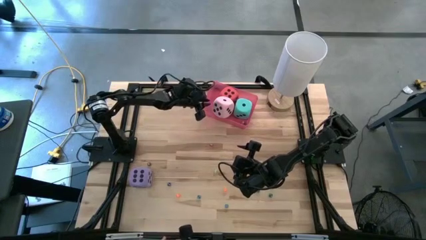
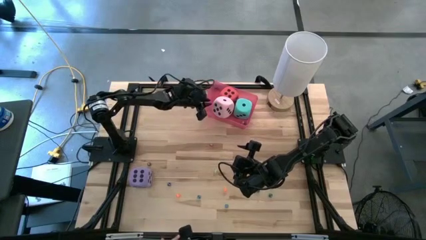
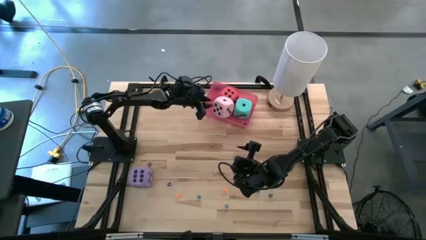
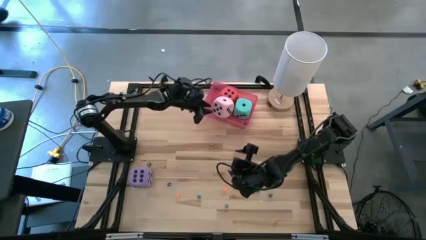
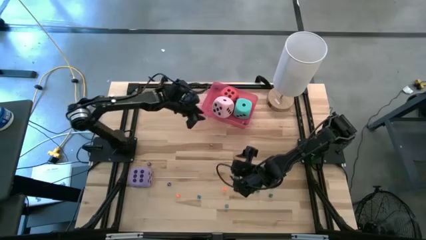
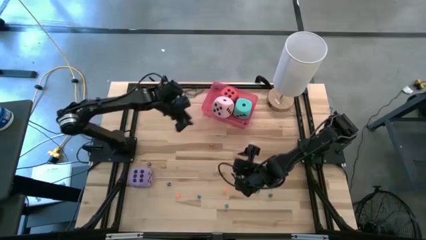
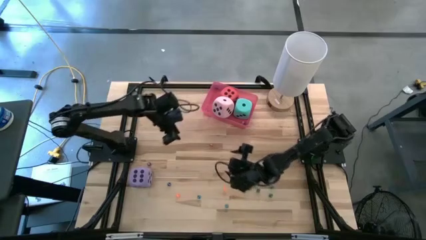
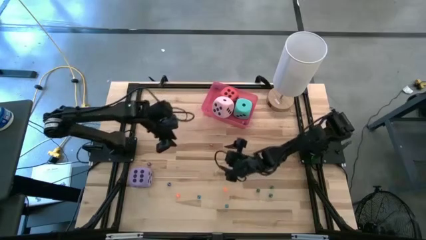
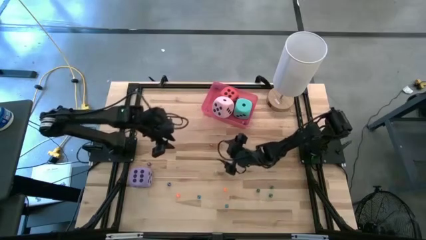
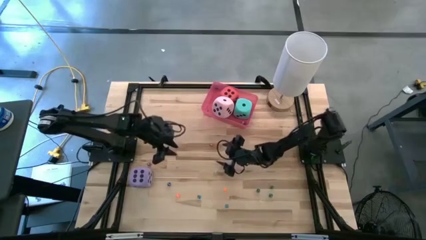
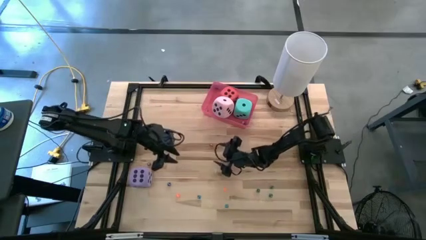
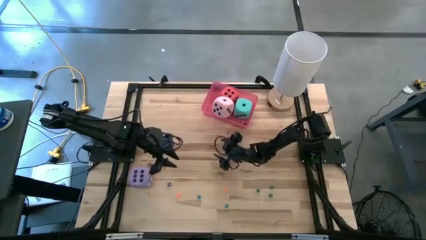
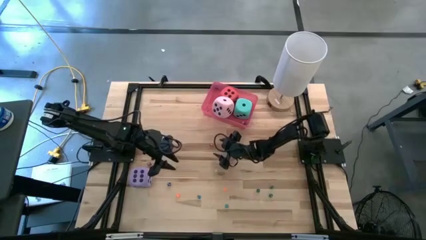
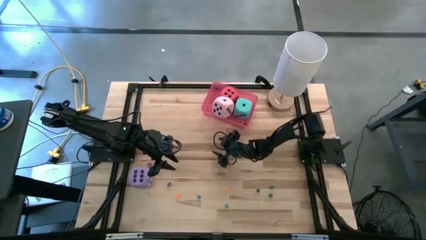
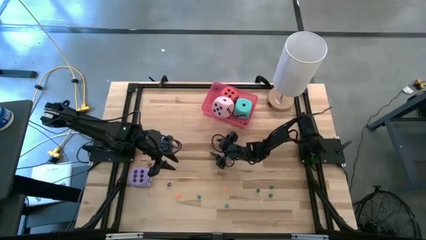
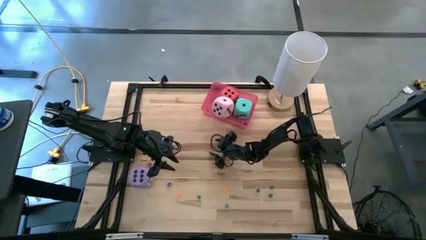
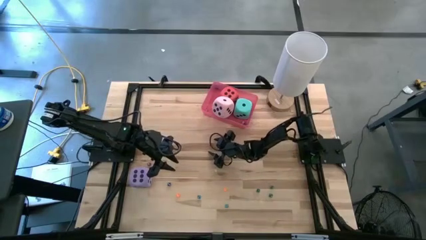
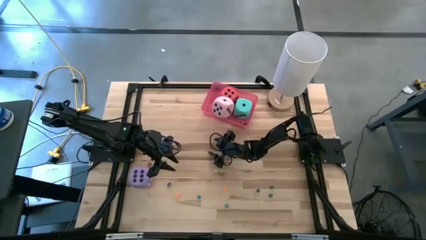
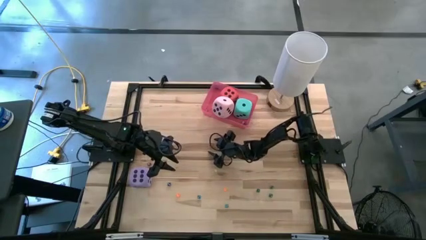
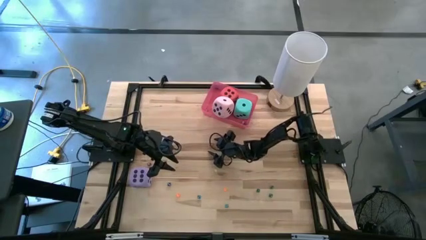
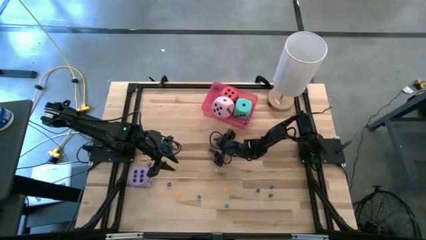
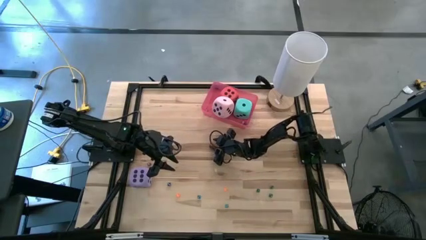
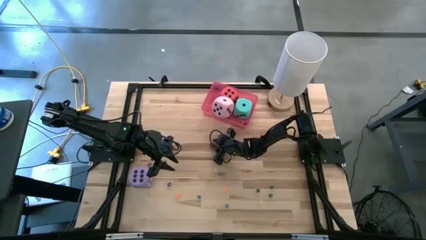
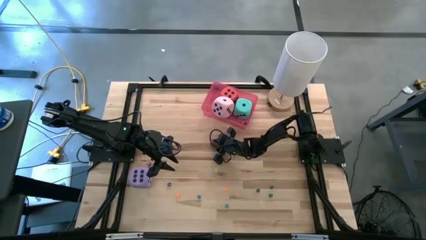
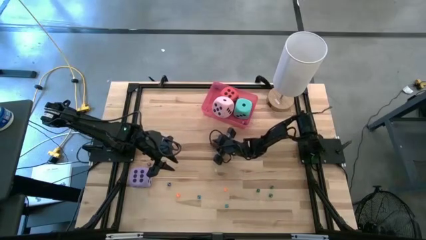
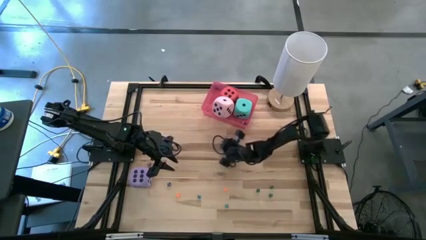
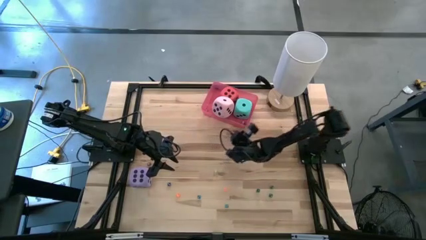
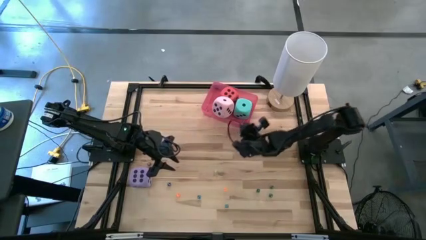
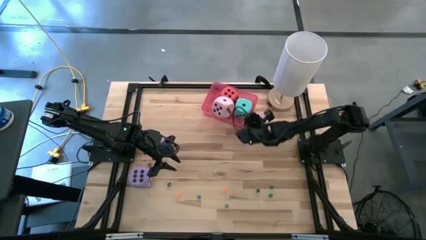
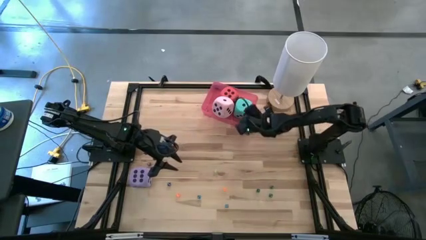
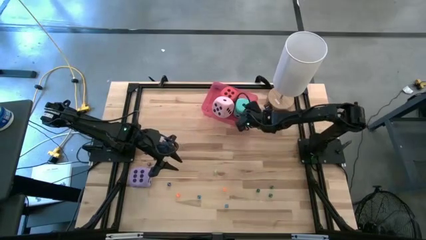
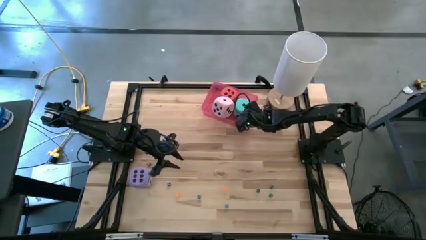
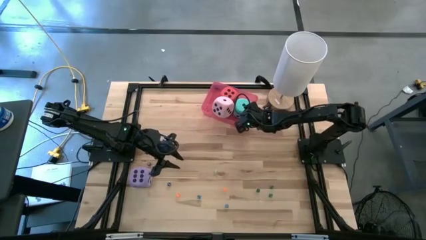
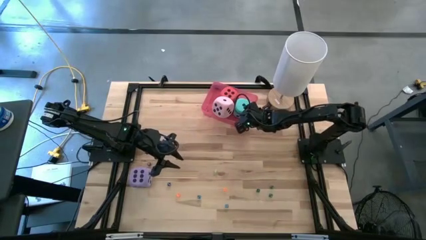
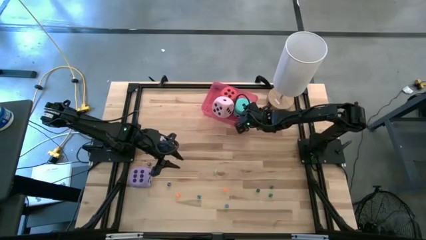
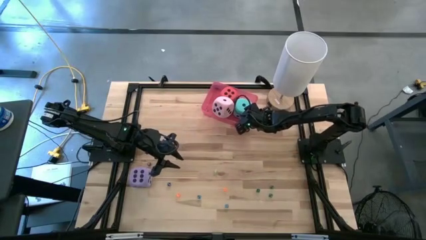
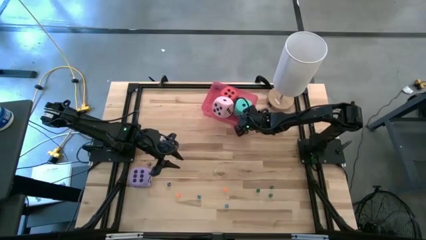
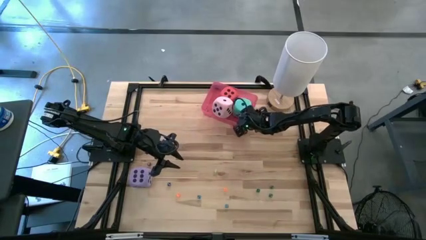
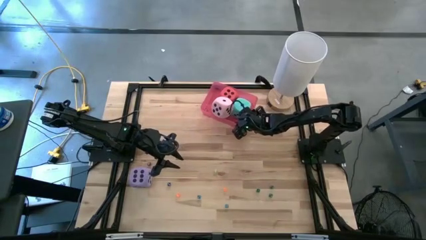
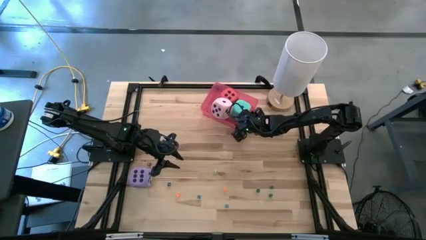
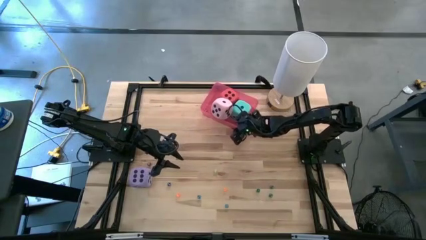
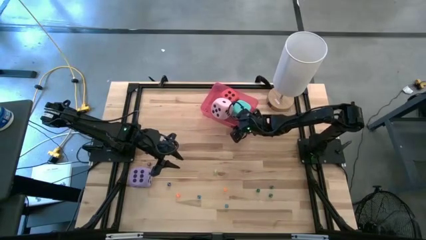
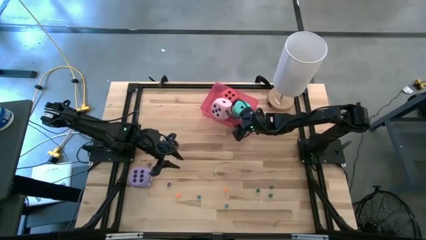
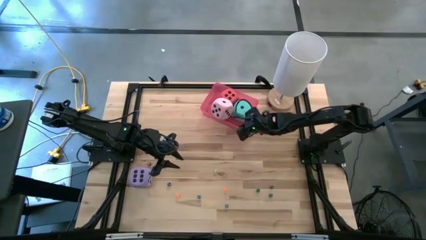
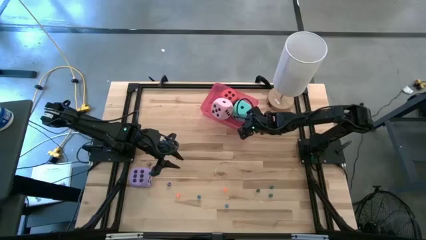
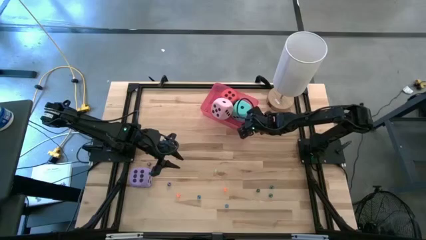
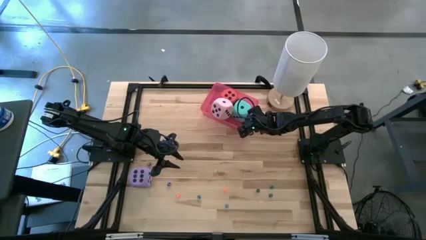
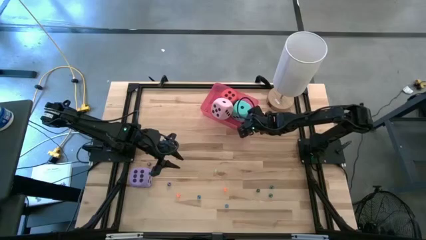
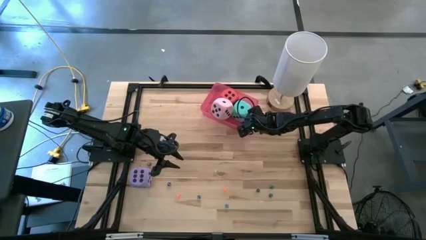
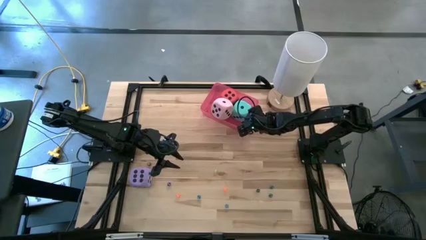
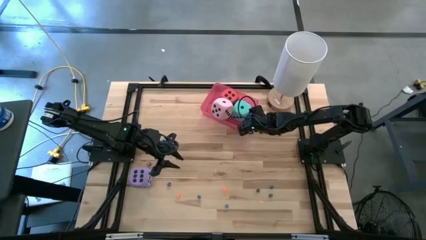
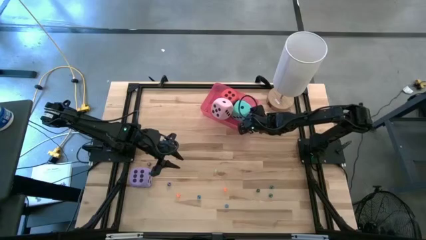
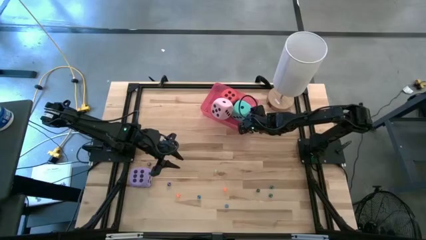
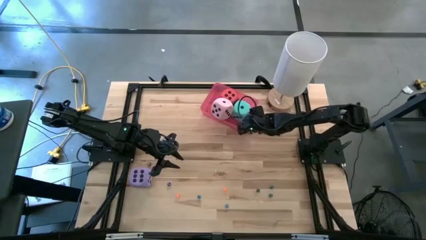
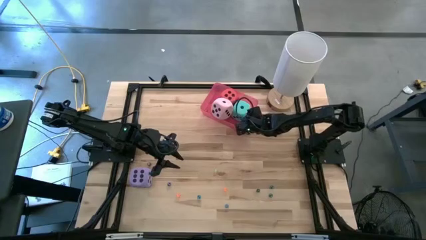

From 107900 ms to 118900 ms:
Task: Pick & Place Dice
Put the small red dice into the pink bin

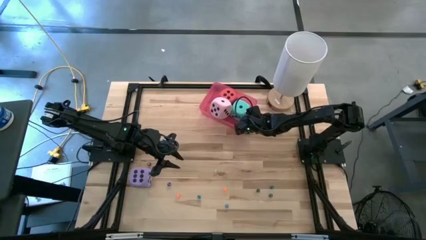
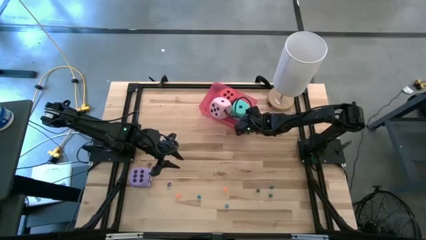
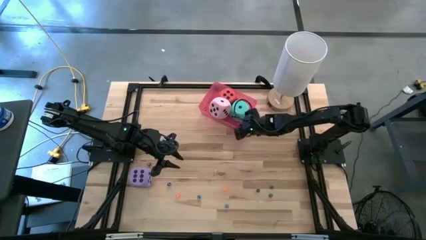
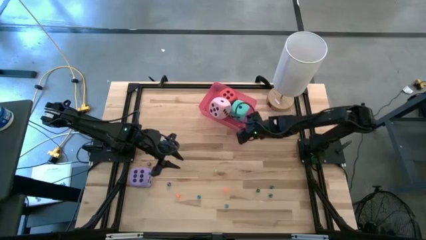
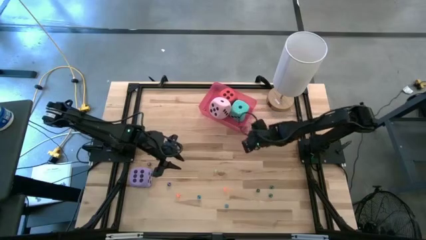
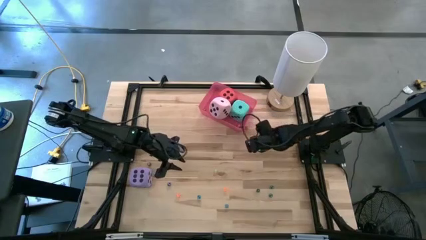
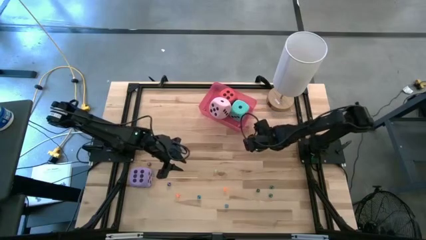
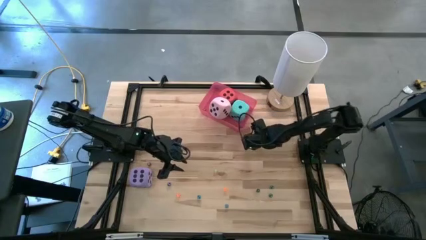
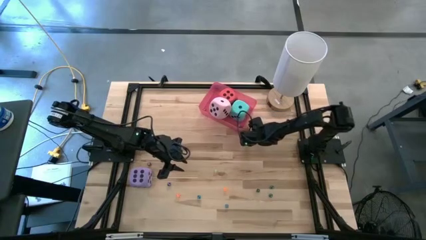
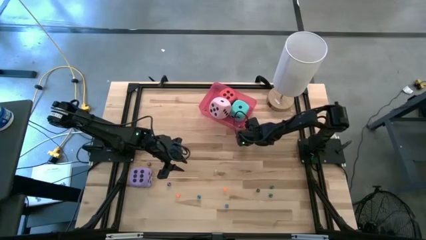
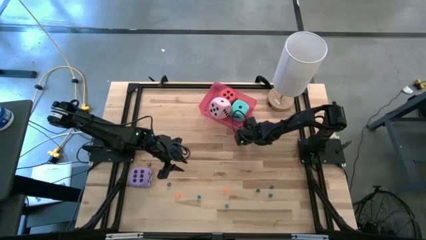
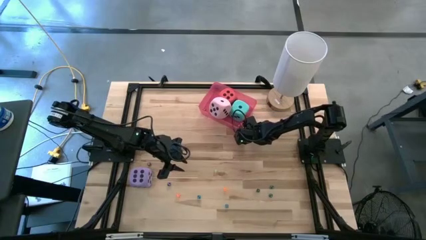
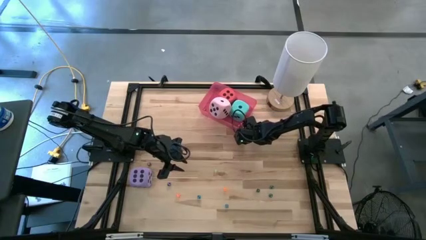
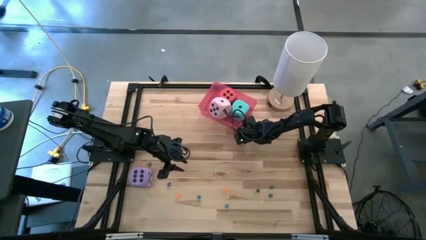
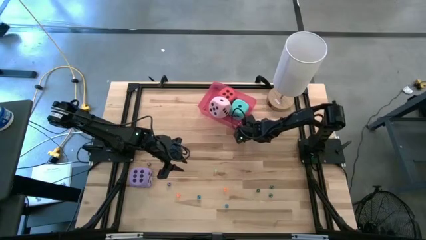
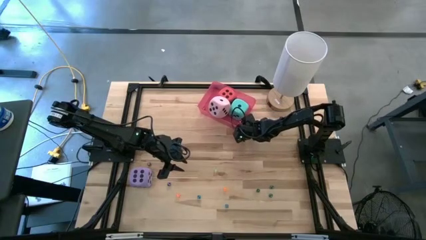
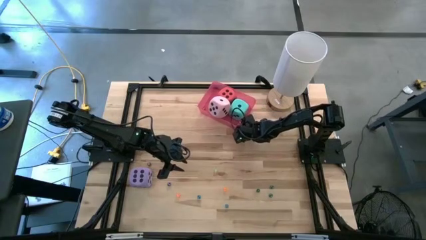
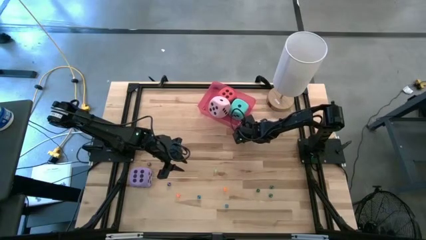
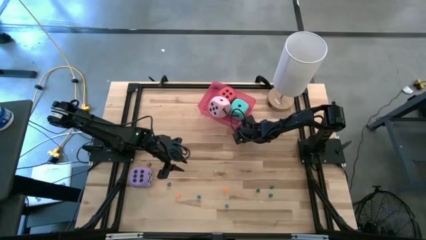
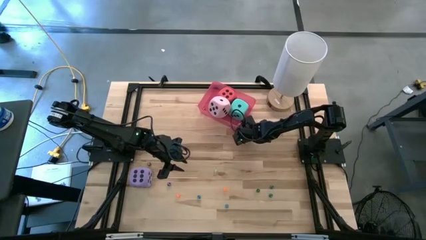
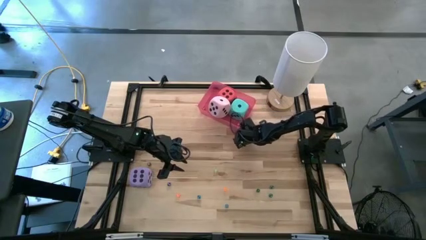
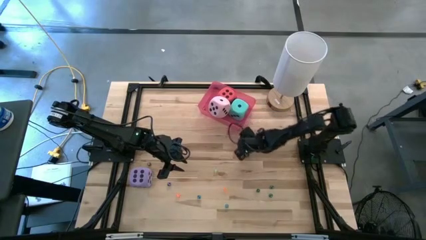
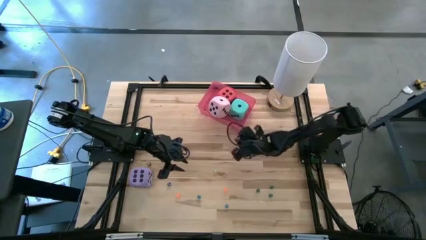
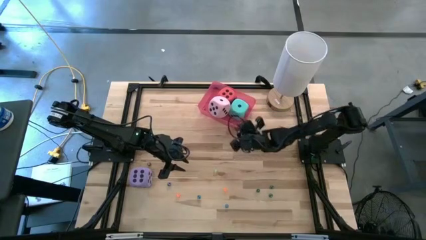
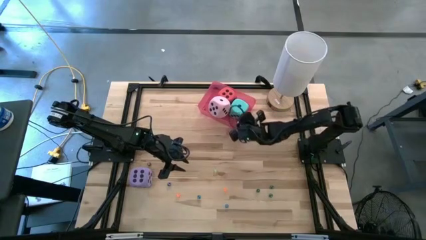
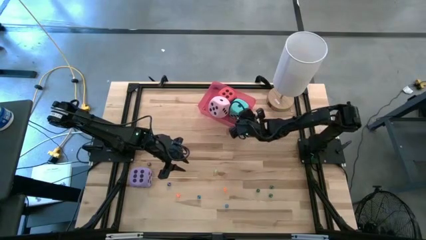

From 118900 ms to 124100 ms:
Put the small red dice into the pink bin
